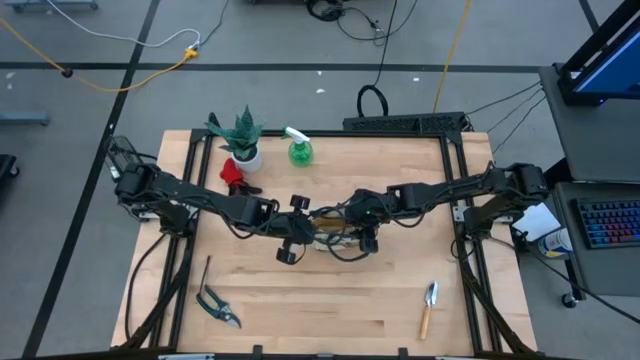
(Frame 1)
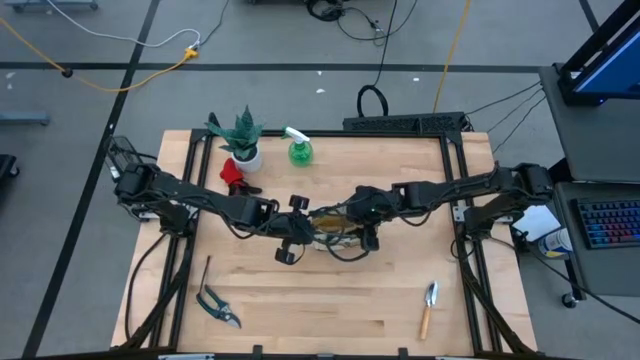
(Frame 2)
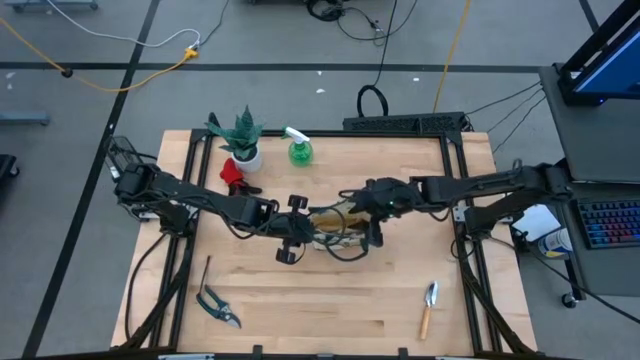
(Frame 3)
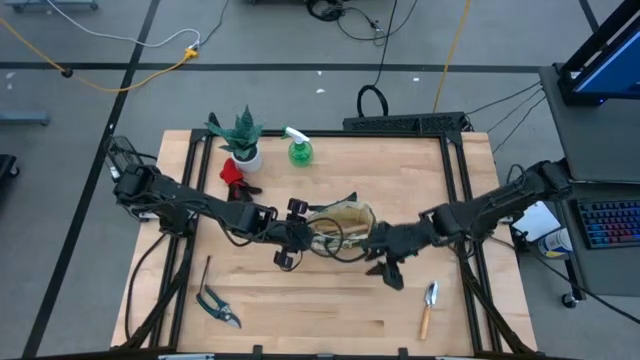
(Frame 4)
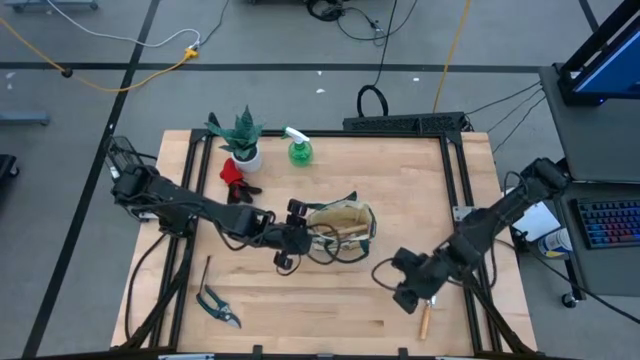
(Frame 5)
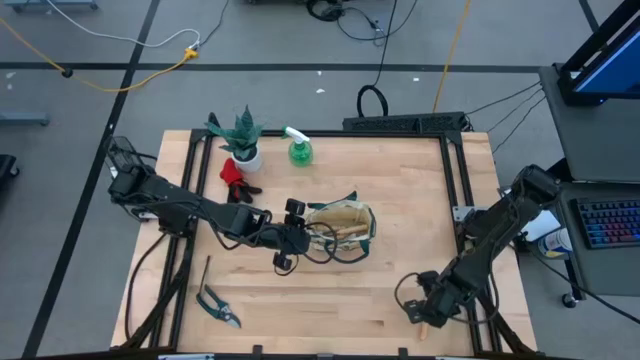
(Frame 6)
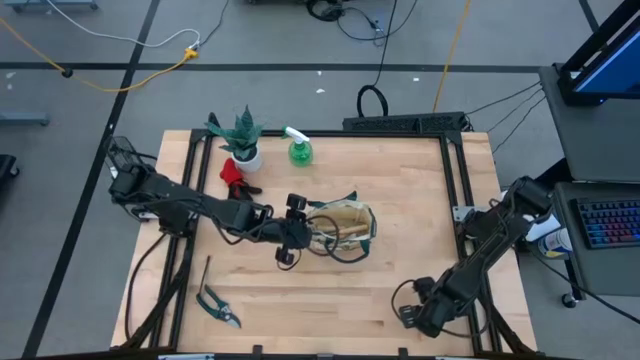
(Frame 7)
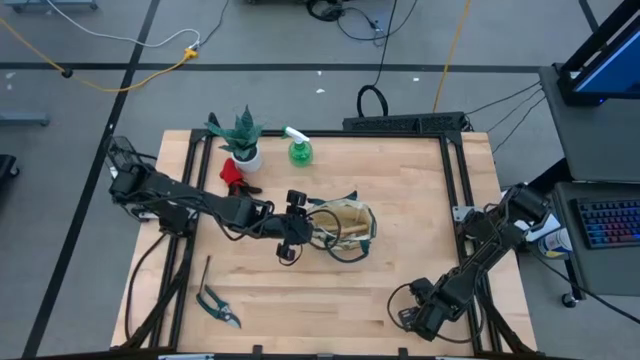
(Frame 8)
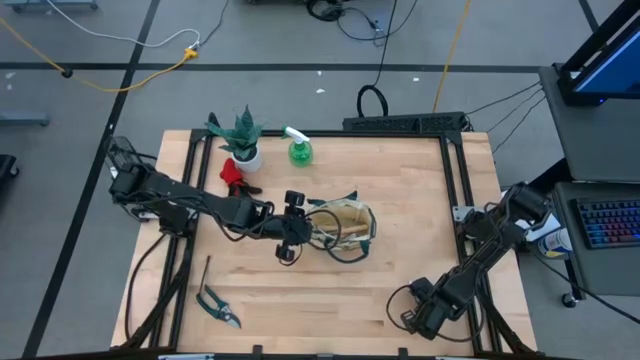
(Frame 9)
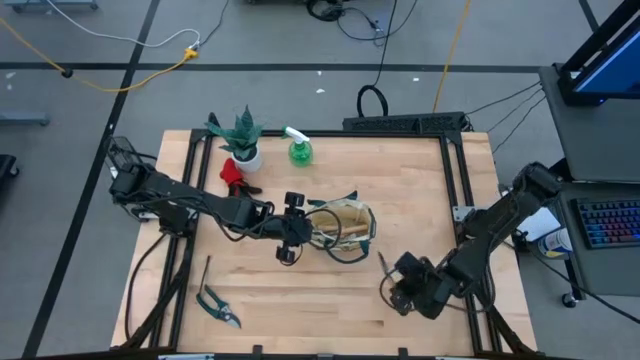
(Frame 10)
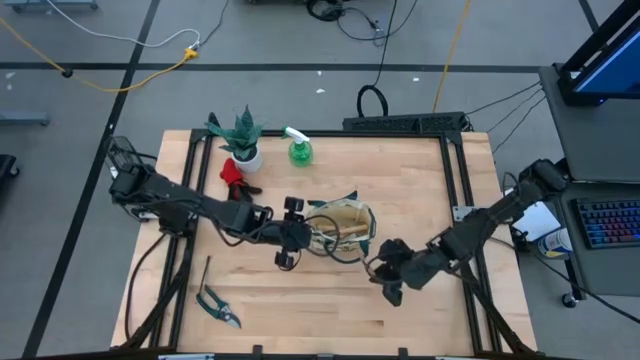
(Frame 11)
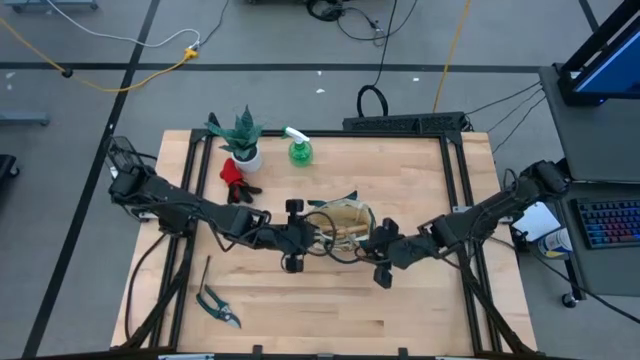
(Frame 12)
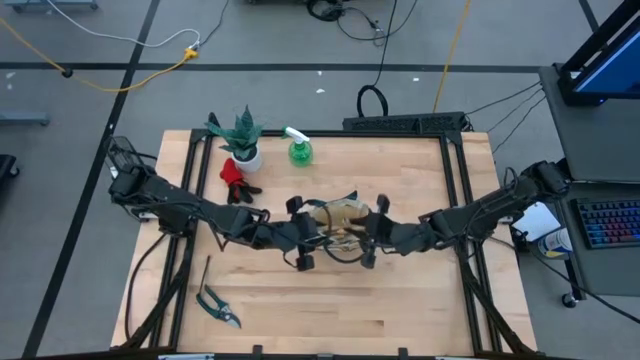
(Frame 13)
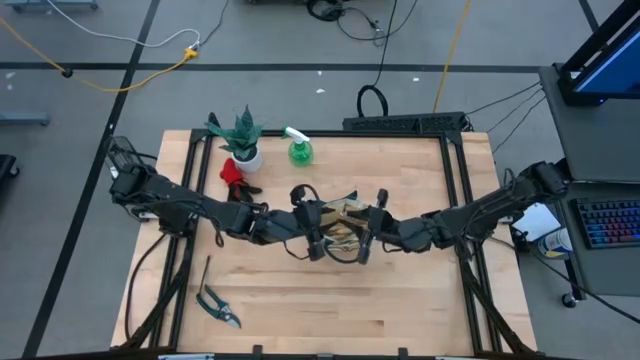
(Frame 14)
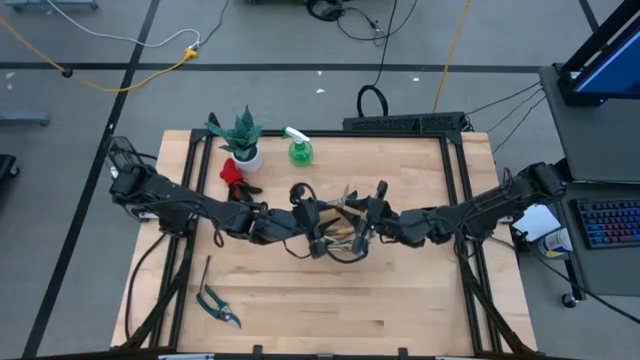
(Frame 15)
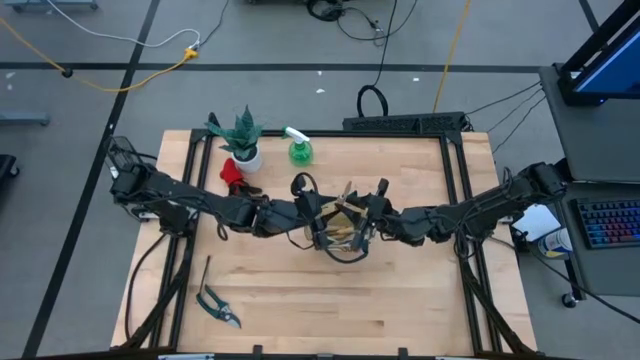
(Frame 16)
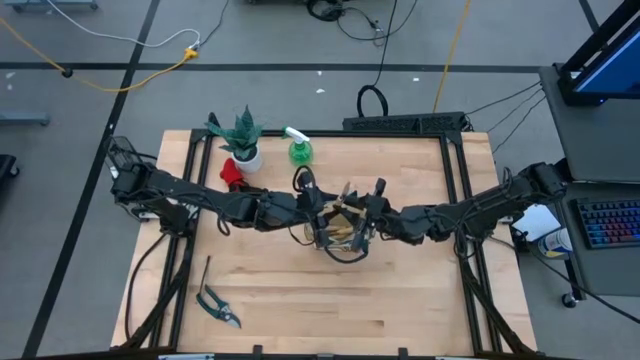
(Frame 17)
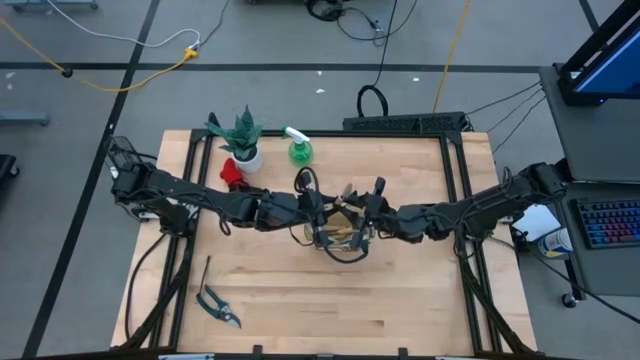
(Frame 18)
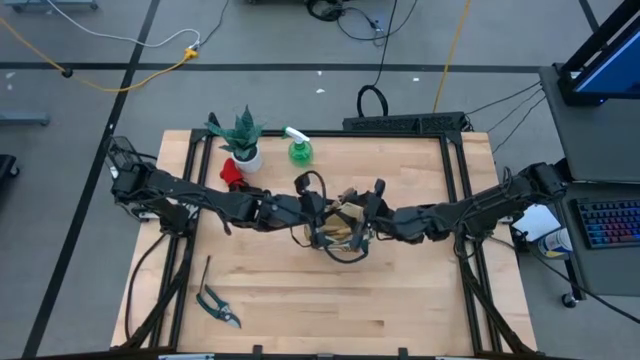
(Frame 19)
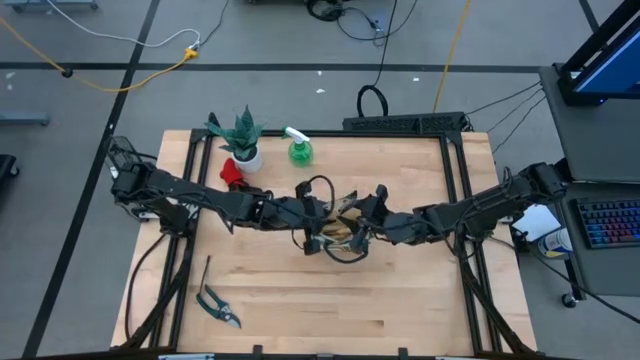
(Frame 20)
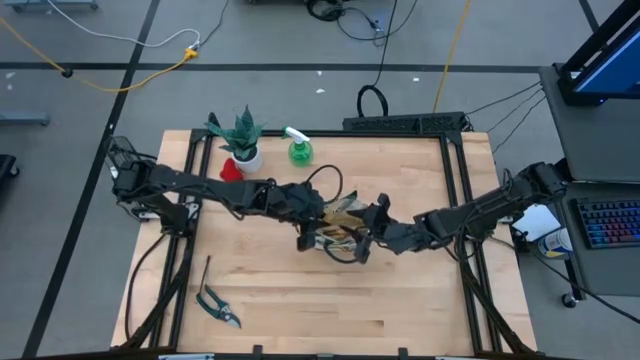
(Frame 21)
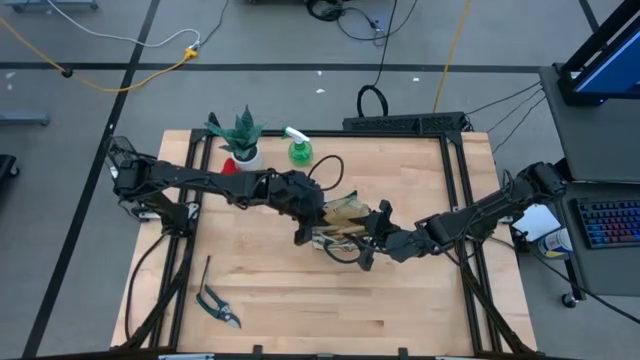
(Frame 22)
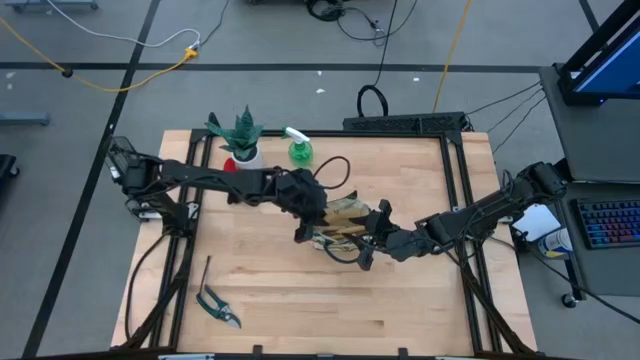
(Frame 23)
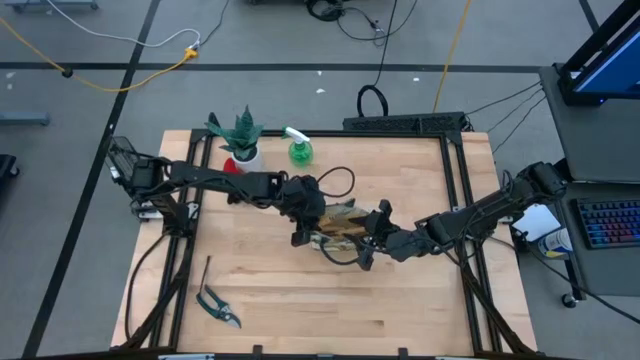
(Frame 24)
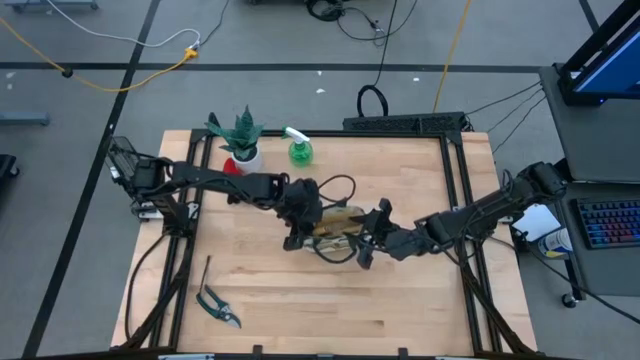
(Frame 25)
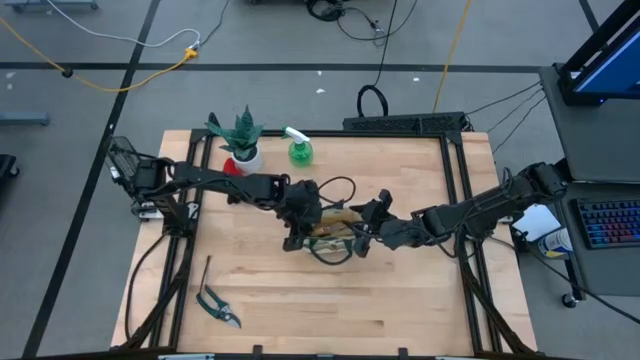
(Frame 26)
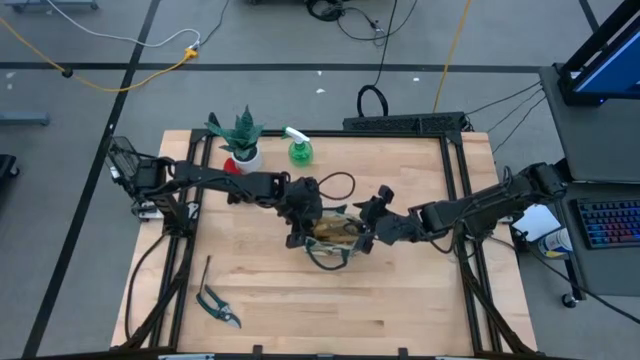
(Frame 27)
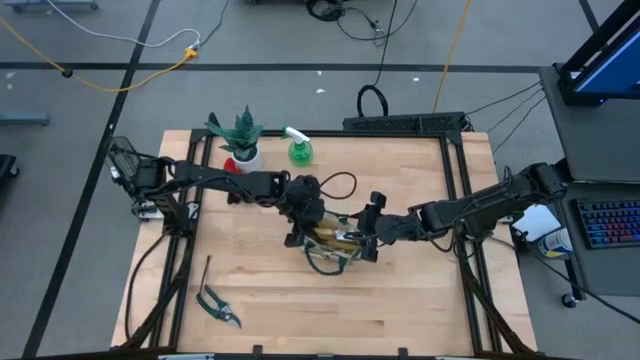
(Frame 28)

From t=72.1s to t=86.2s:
Task: Pick & Place Garden tools in Gardening bag
Put the light brown trowel into the gardening bag

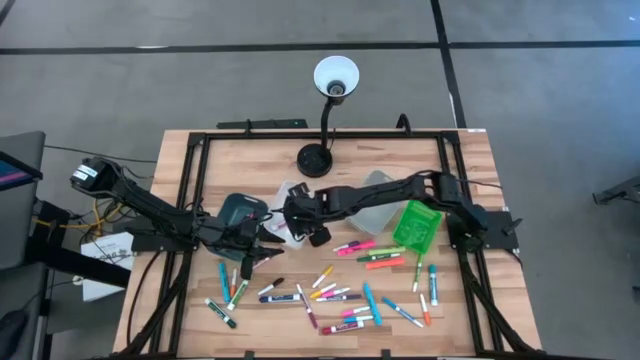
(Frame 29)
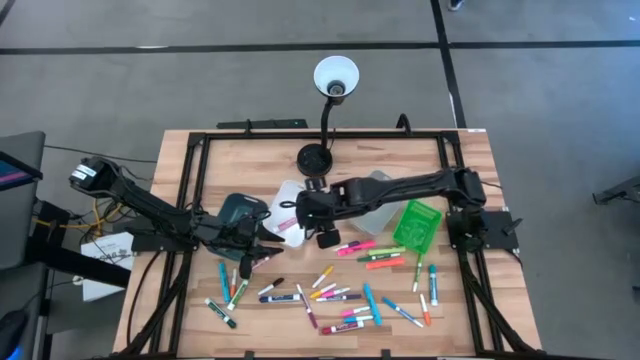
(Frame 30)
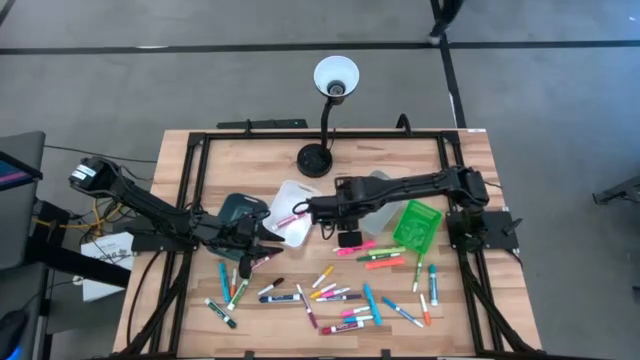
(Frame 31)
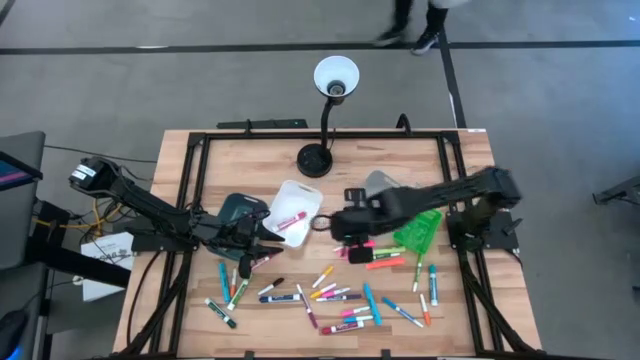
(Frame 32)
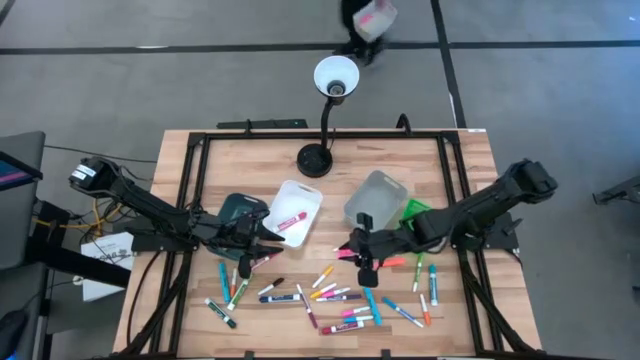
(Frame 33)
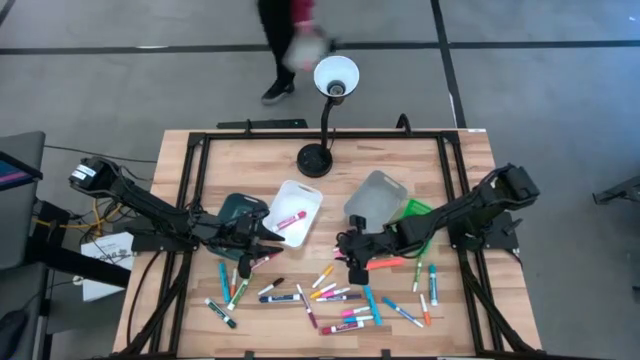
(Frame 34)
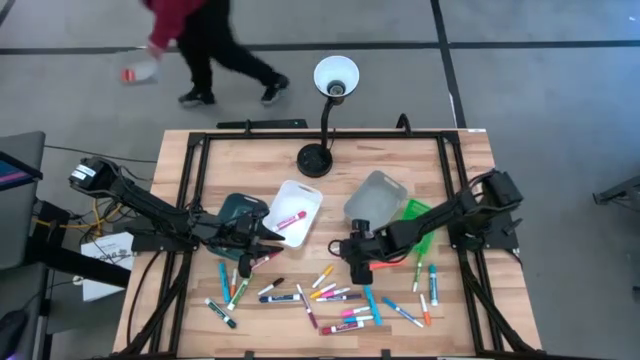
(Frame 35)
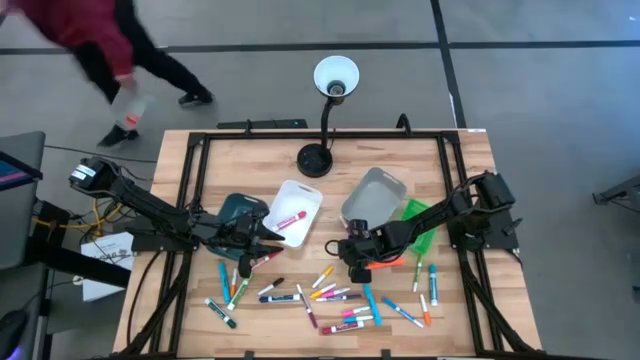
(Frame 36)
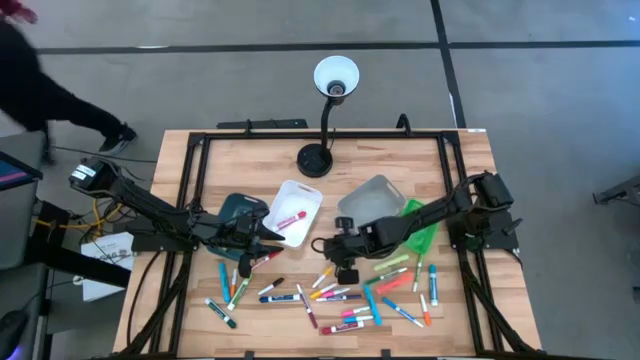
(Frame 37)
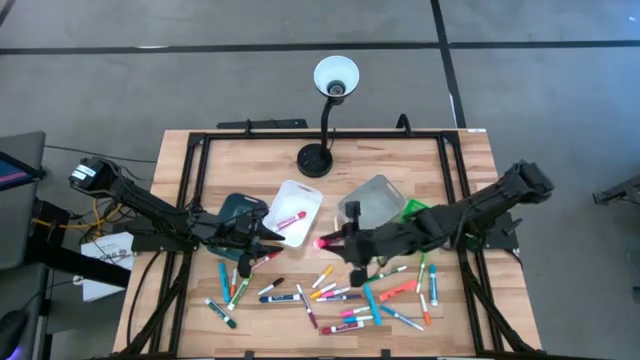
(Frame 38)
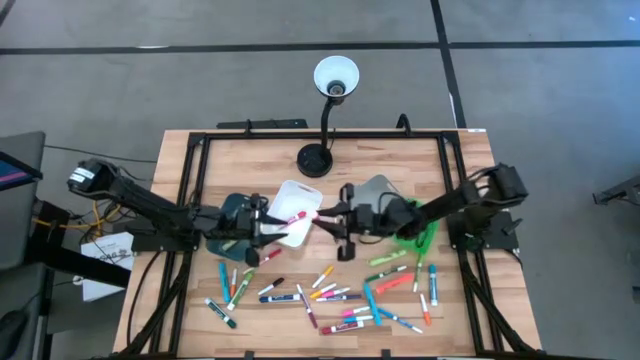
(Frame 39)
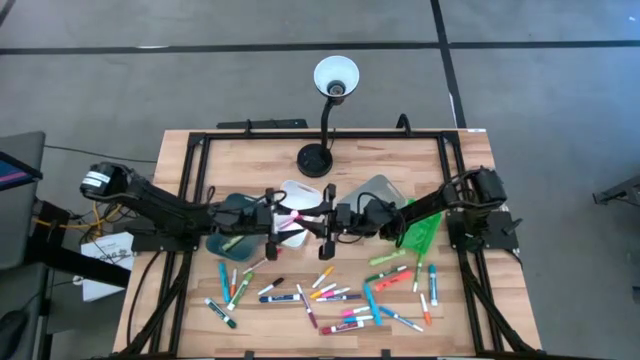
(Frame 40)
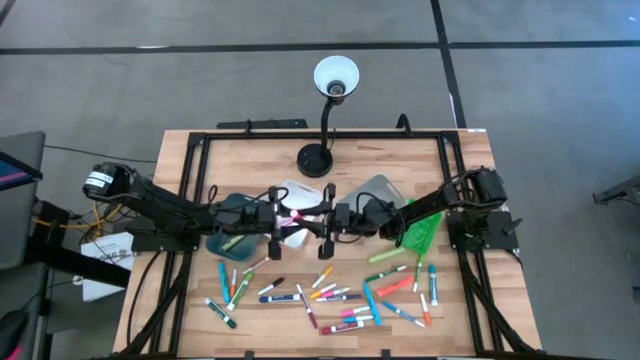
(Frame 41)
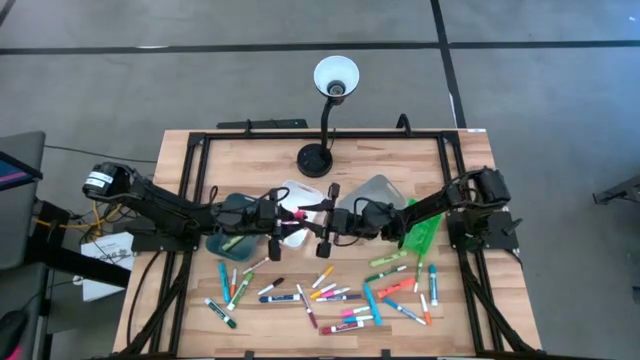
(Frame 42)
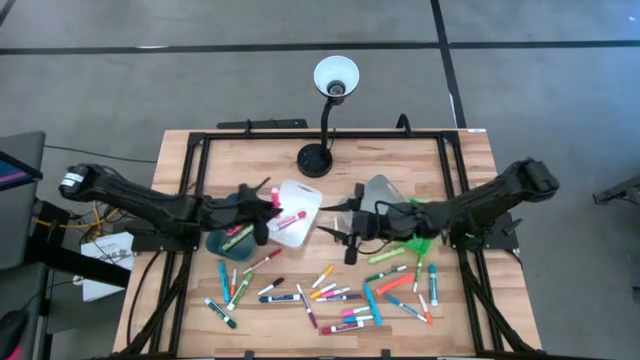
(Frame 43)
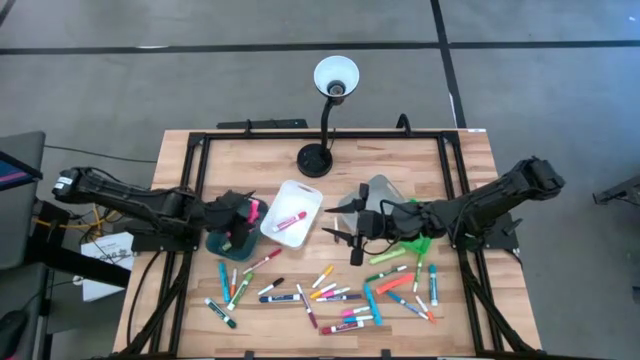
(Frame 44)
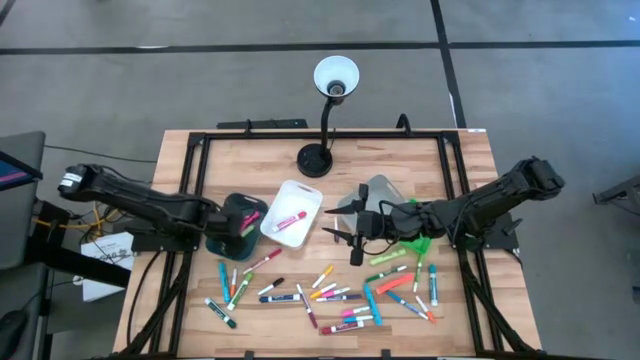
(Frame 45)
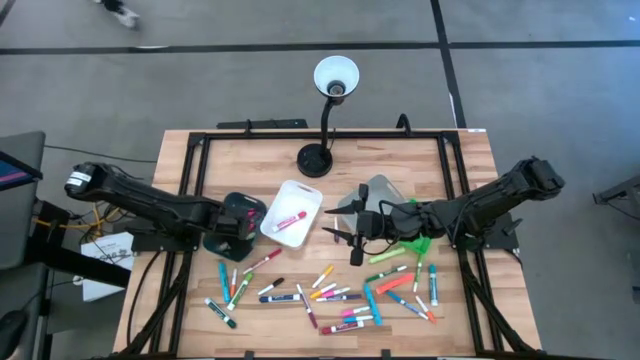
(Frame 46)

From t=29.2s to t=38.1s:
Task: Pick & Place Markers
Put the pink highlighter into the blue bin
